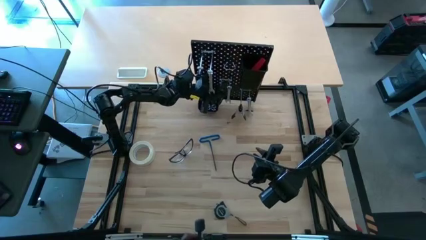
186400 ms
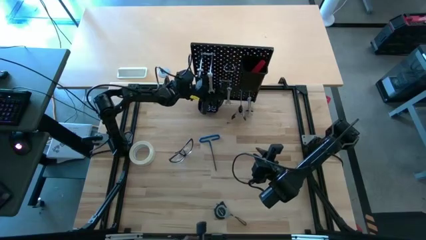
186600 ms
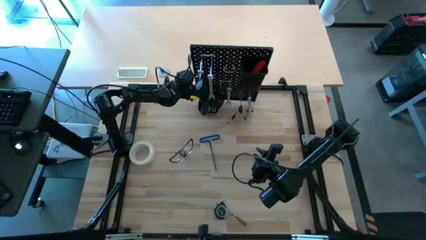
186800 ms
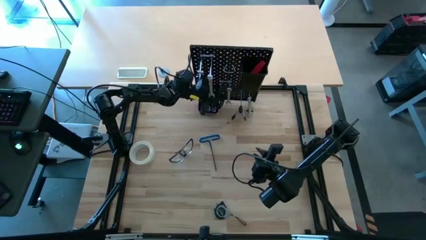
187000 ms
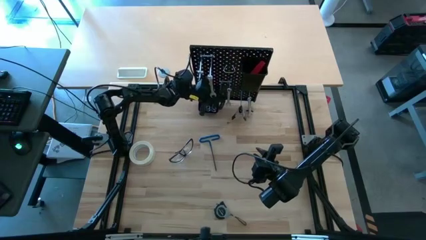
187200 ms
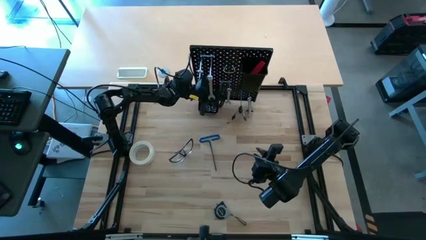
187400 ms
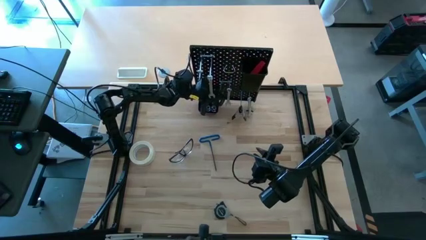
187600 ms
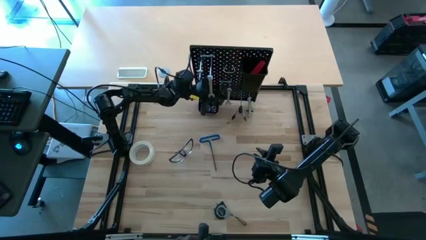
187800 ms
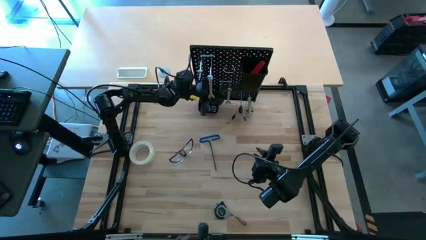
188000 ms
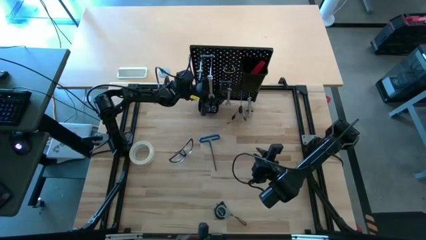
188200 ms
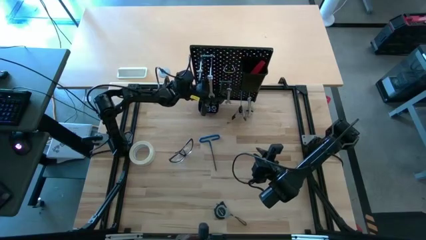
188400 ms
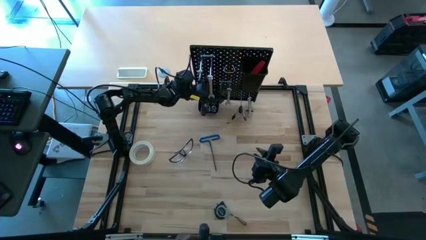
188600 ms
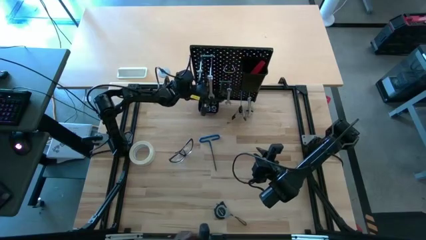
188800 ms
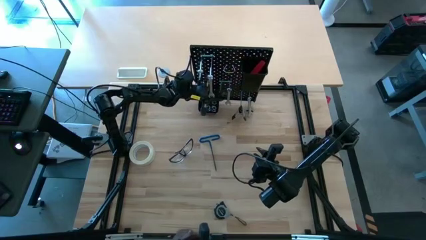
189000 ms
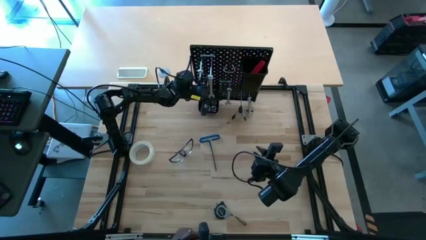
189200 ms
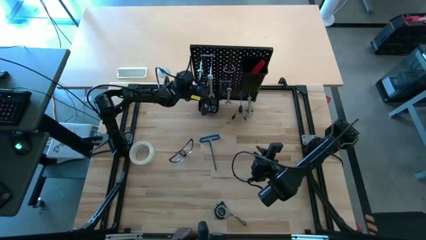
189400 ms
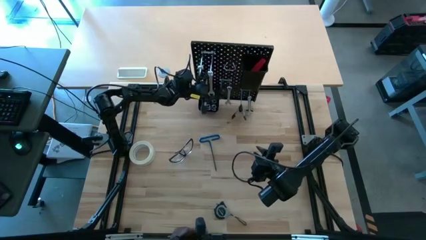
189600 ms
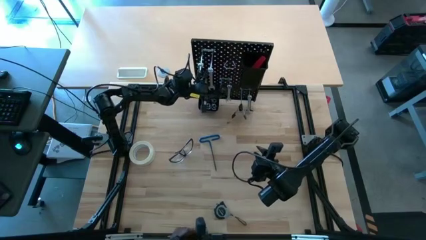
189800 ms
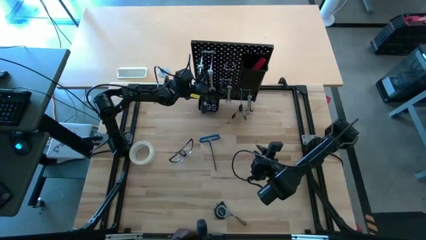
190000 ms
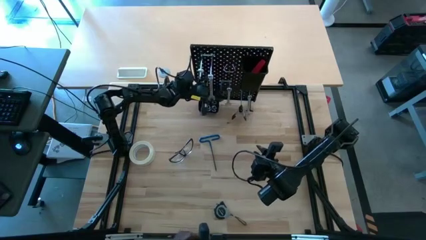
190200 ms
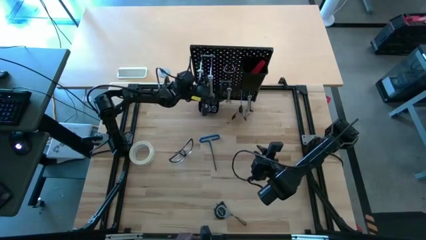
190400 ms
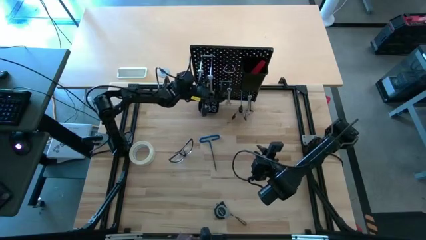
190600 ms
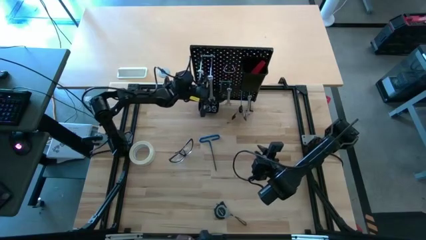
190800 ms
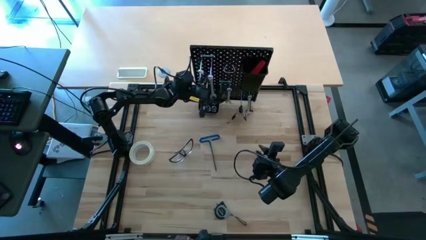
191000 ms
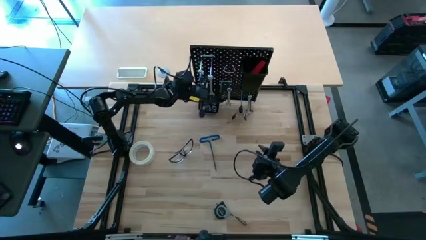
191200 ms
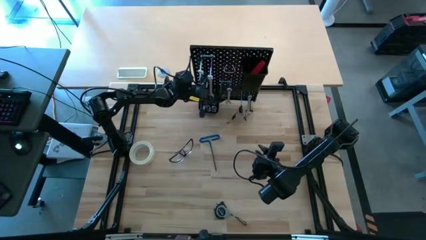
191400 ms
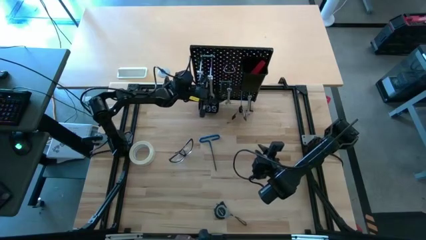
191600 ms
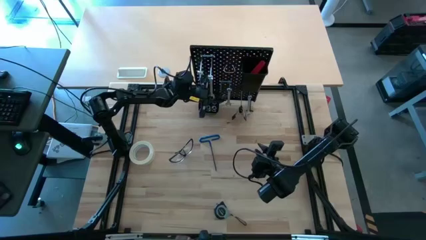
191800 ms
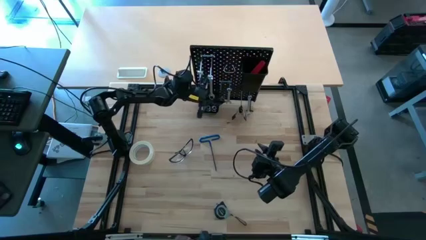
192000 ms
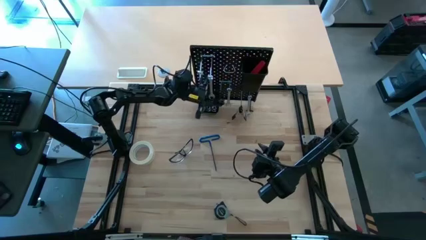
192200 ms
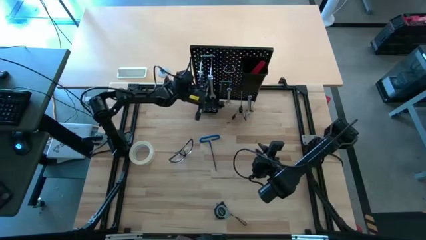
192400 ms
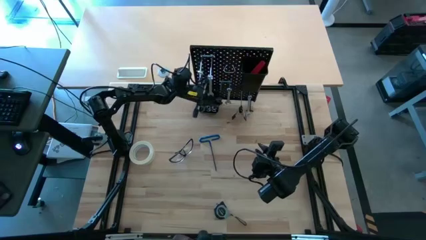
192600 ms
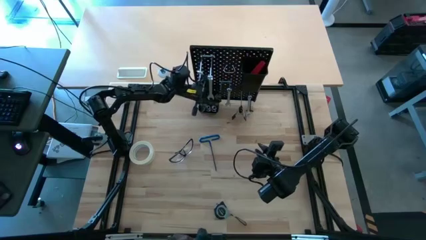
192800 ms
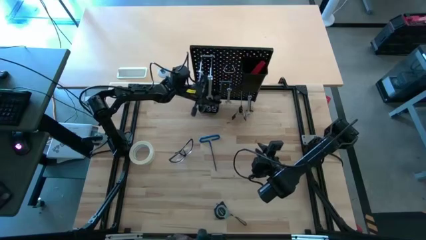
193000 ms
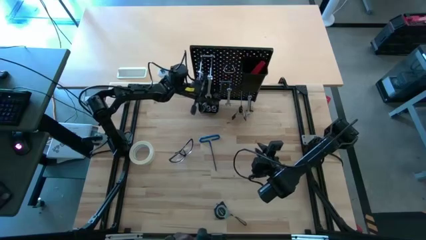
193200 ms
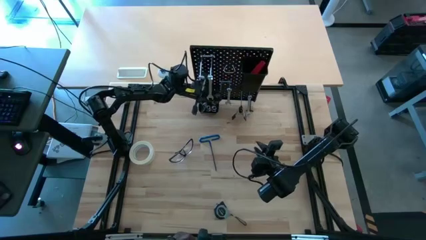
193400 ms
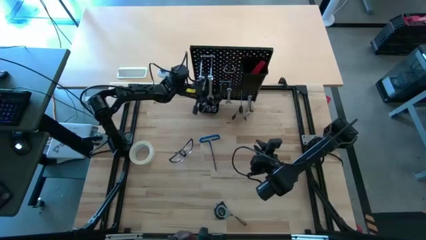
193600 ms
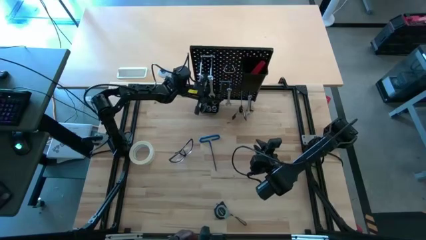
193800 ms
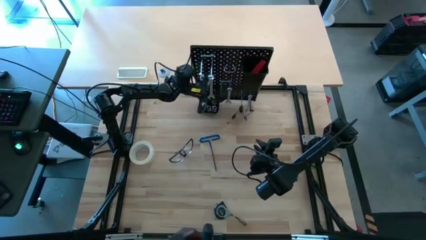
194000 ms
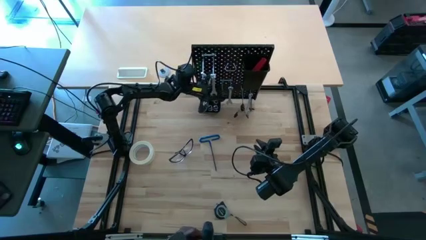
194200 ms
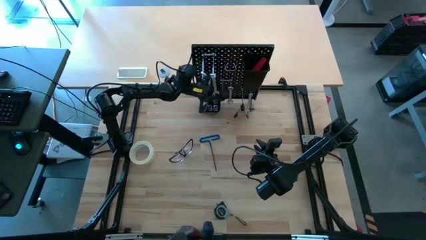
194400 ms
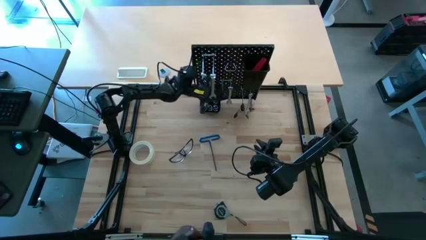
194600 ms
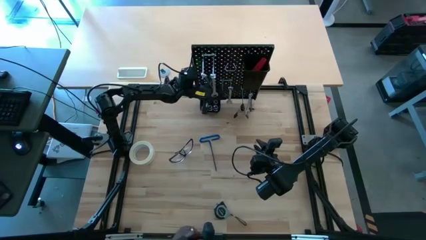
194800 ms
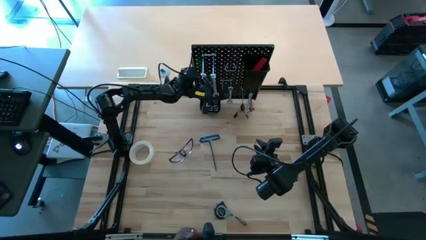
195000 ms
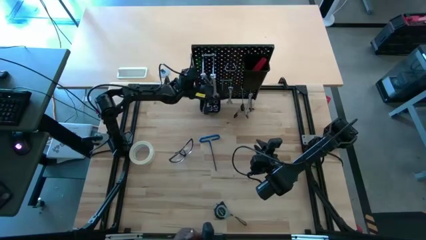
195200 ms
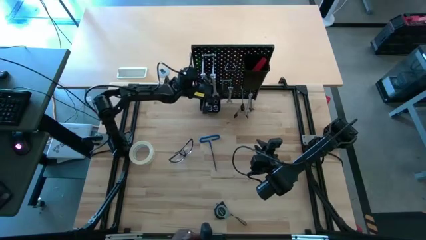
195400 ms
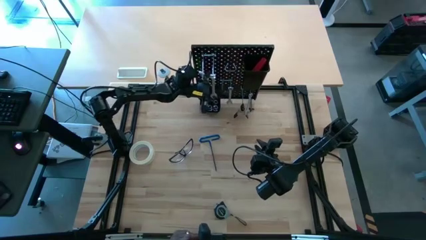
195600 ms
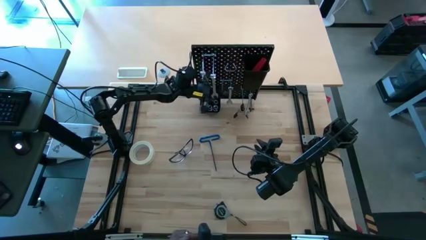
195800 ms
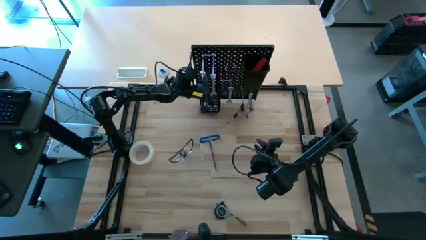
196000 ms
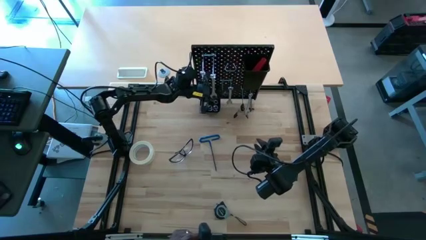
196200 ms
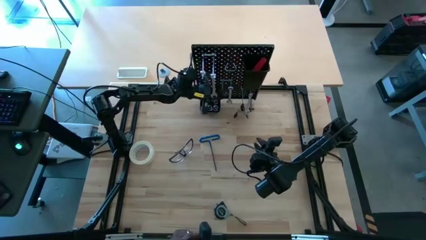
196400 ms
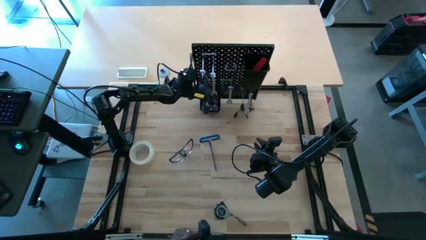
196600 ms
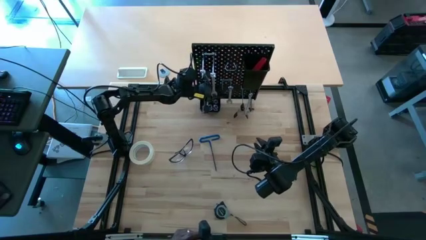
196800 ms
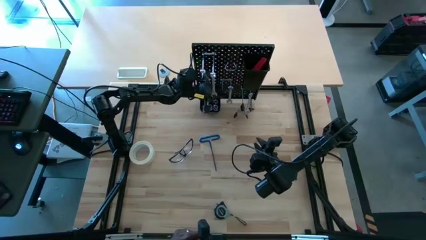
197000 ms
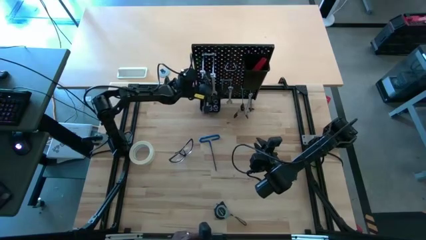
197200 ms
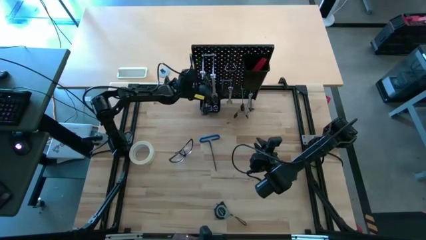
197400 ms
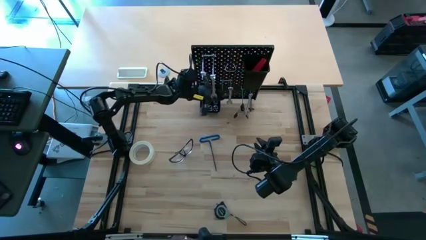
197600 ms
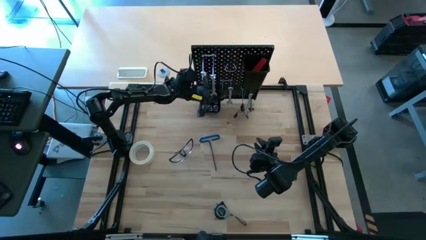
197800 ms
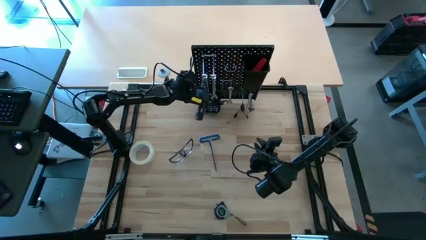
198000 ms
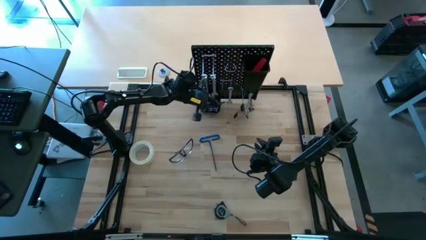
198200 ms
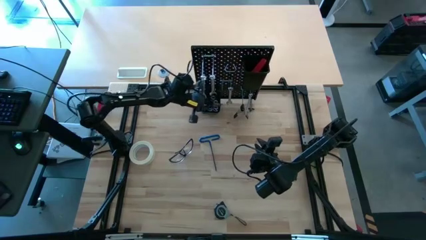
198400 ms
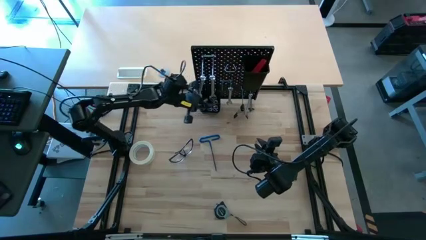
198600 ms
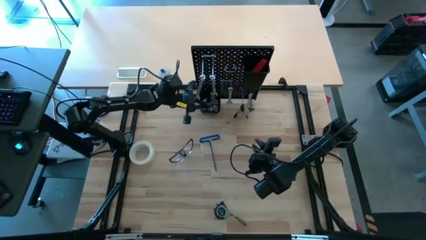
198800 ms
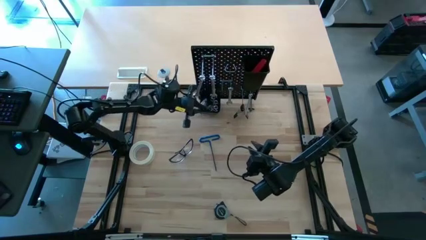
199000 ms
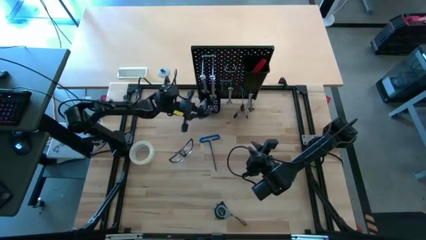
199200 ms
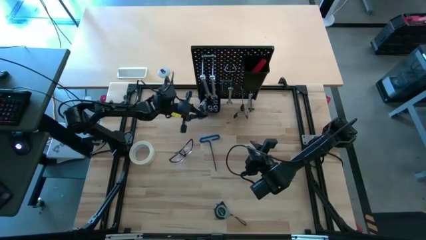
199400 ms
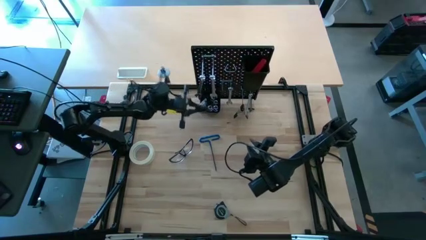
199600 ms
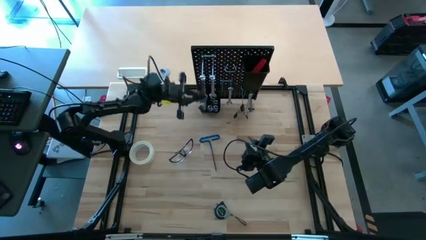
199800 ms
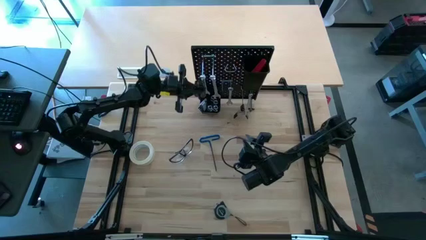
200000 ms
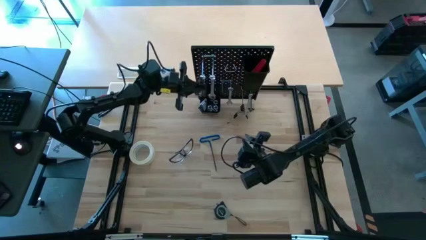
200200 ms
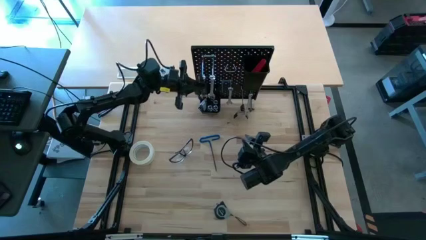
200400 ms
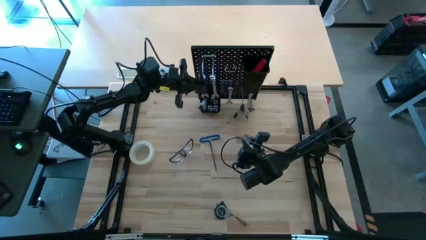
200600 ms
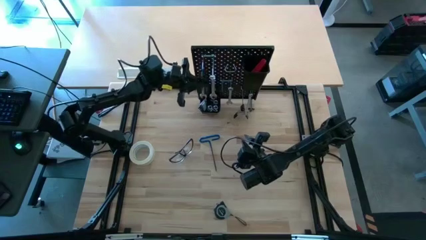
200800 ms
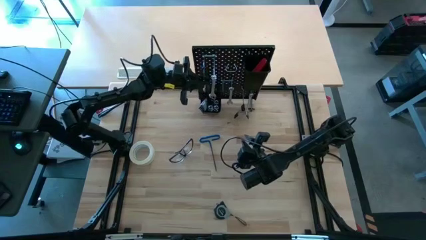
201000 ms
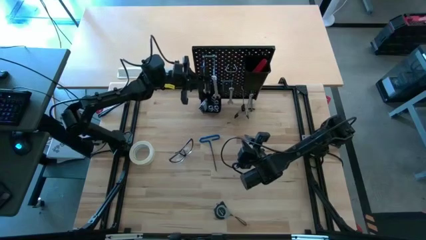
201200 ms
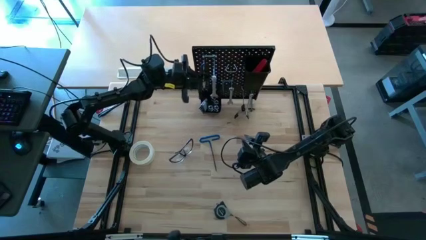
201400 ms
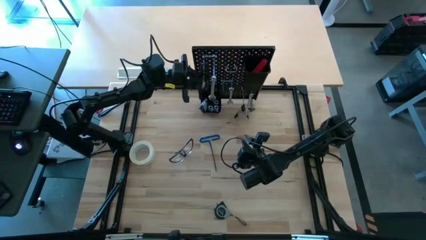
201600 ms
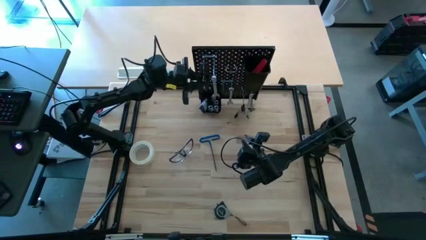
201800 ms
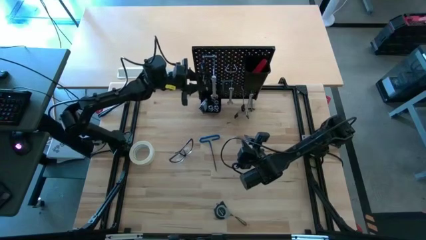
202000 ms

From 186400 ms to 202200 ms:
Task: Hang tools onto peg board
Hang the wire stripper onto the peg board

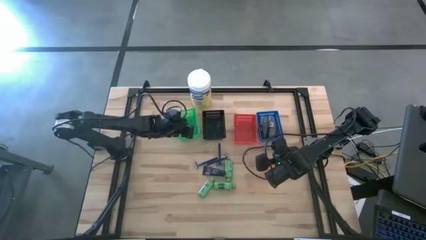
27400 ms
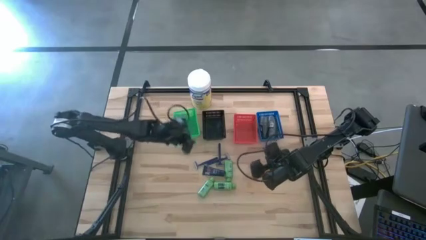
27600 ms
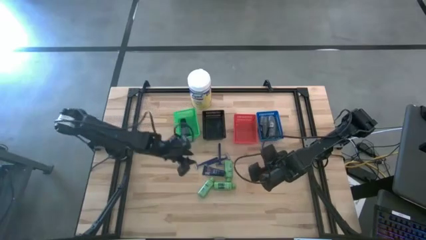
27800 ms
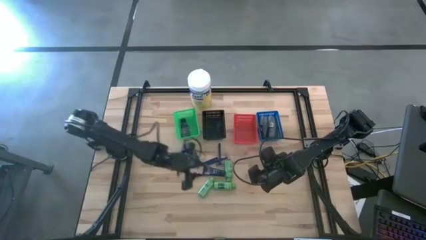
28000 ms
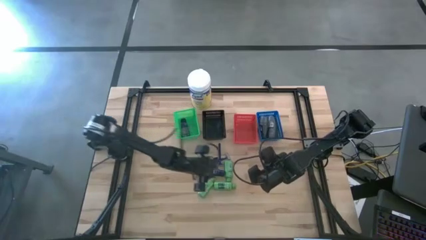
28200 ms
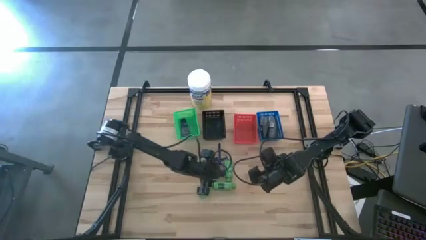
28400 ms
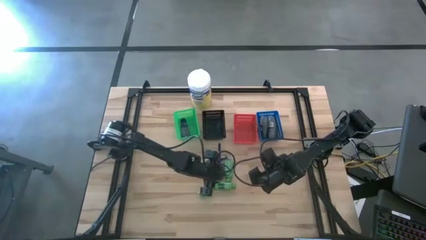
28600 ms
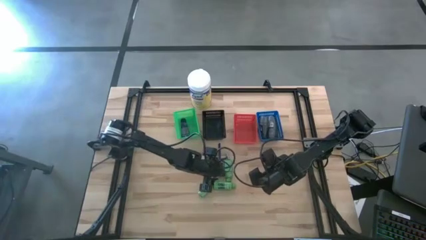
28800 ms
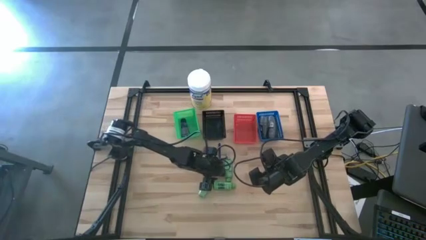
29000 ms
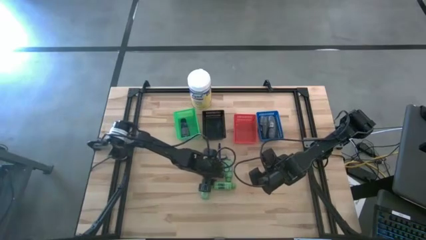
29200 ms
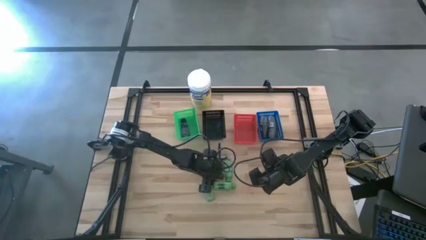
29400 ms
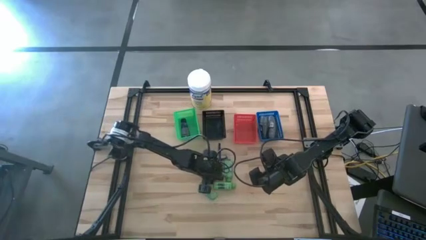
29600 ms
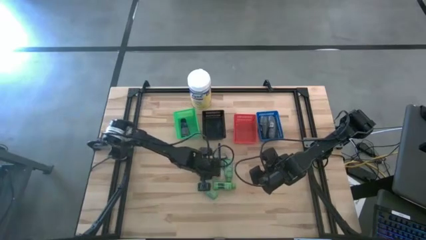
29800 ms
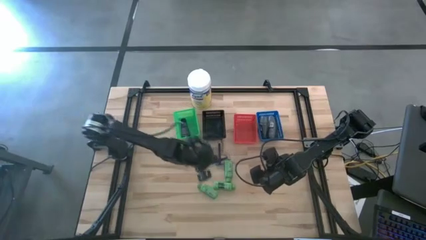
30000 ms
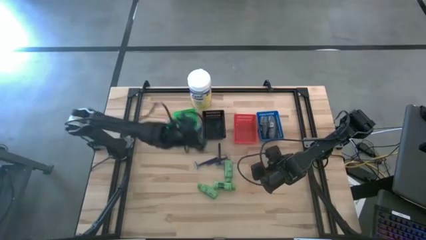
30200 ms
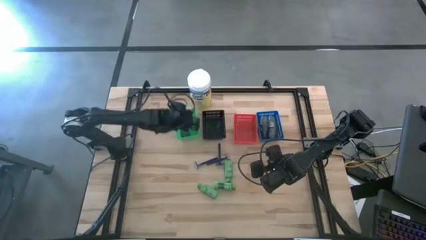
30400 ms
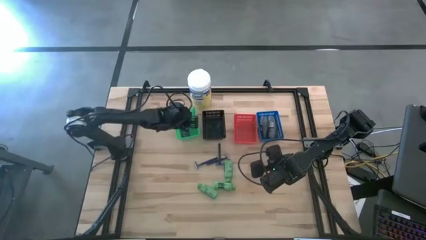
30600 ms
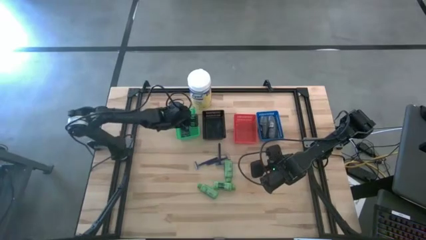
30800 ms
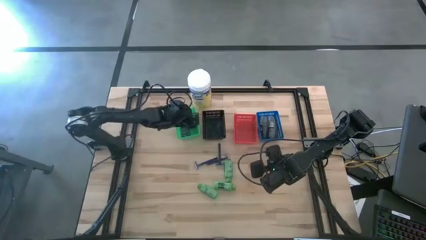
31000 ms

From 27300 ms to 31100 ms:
Task: Pick & Place Travel size toiletries
Put the blue shave cream into the green bin
